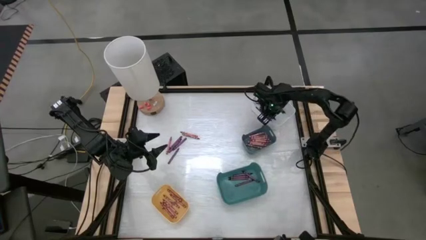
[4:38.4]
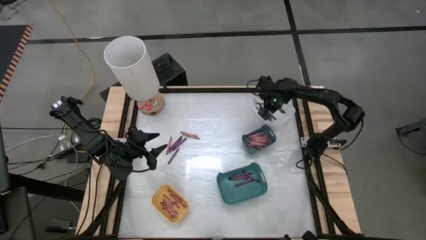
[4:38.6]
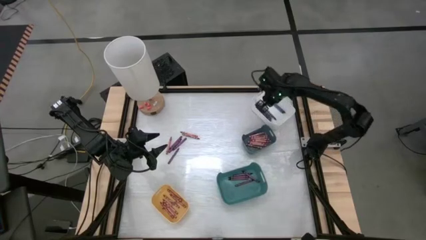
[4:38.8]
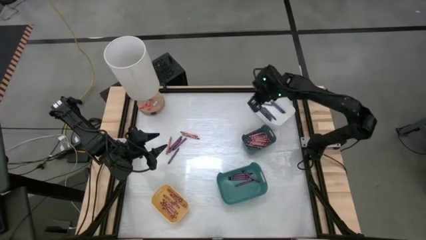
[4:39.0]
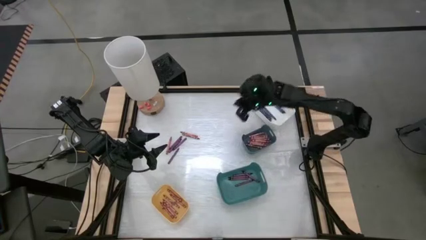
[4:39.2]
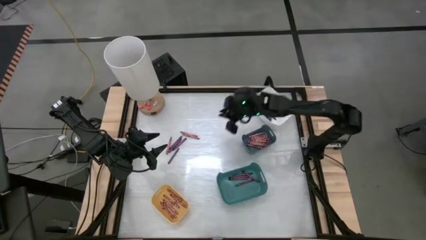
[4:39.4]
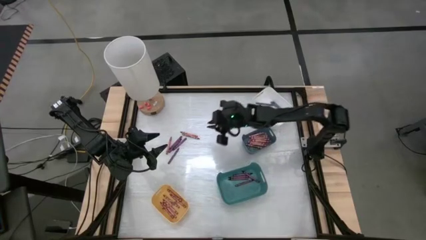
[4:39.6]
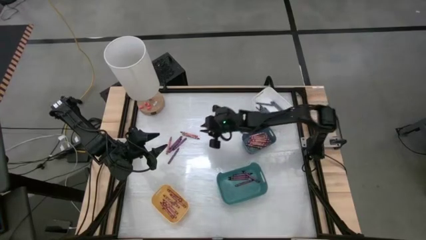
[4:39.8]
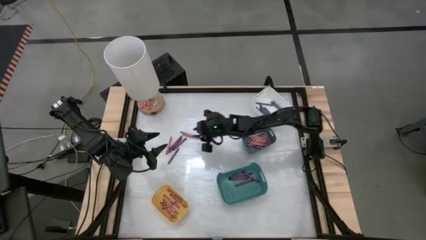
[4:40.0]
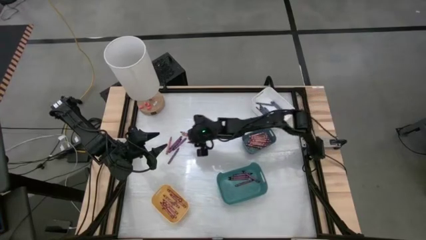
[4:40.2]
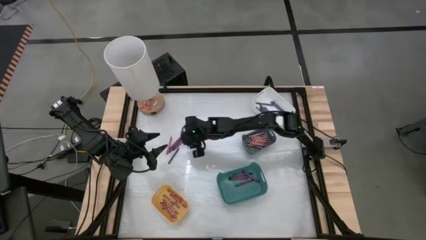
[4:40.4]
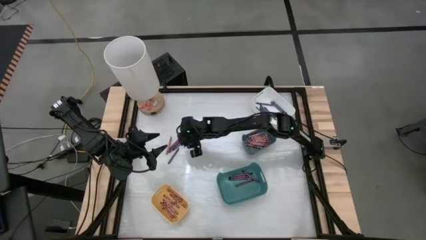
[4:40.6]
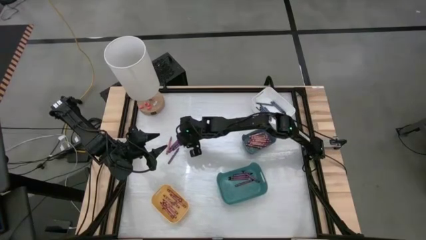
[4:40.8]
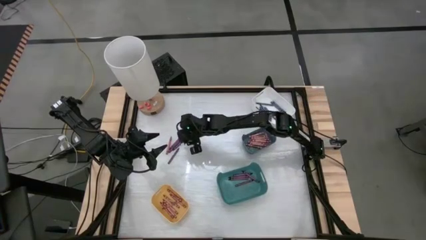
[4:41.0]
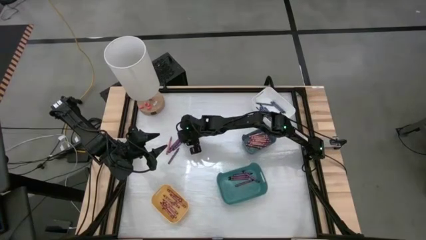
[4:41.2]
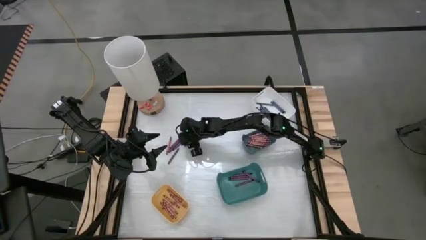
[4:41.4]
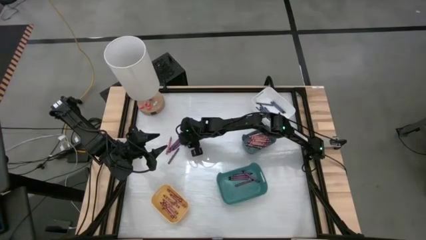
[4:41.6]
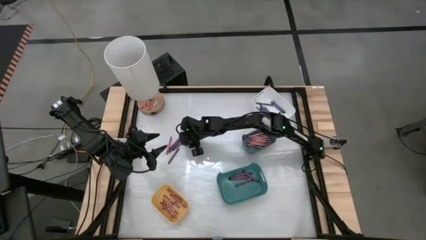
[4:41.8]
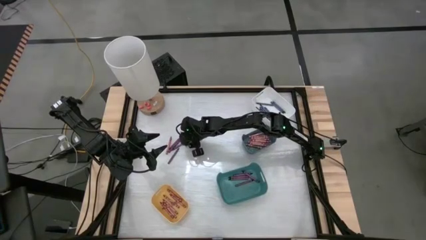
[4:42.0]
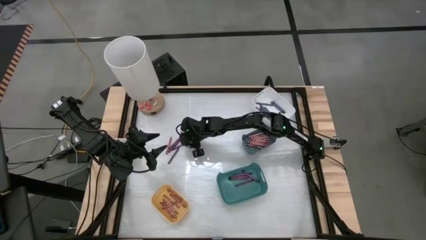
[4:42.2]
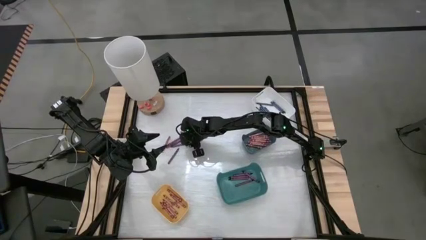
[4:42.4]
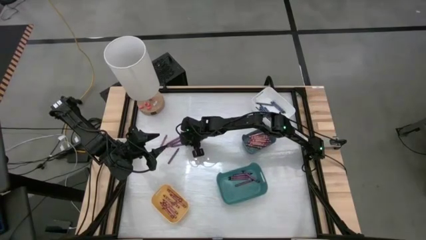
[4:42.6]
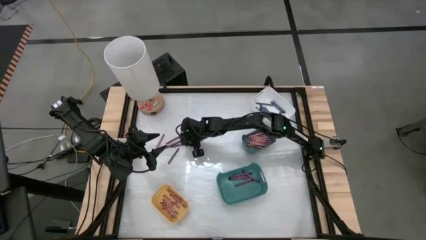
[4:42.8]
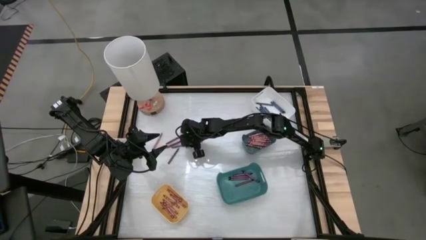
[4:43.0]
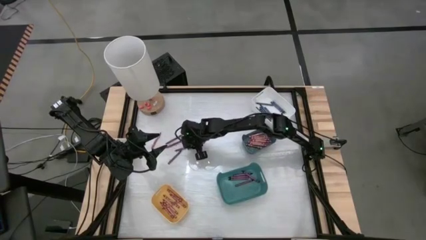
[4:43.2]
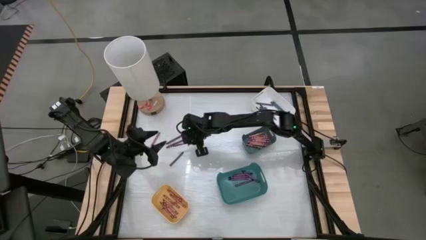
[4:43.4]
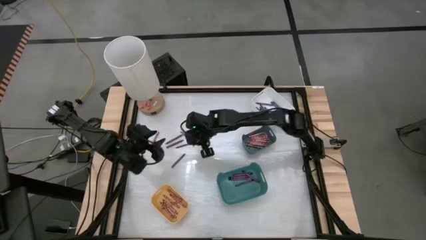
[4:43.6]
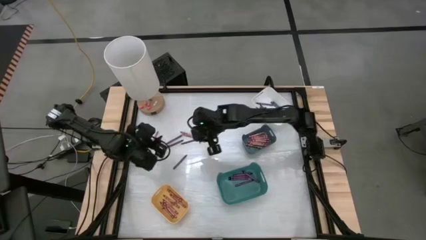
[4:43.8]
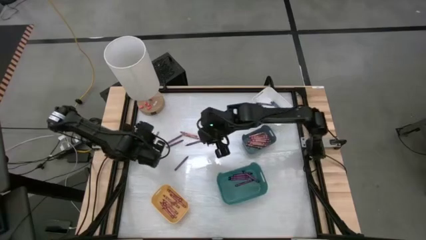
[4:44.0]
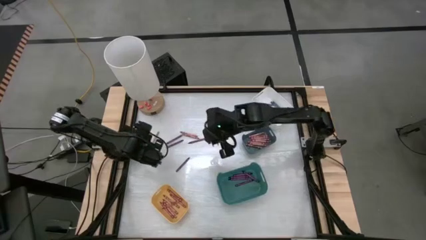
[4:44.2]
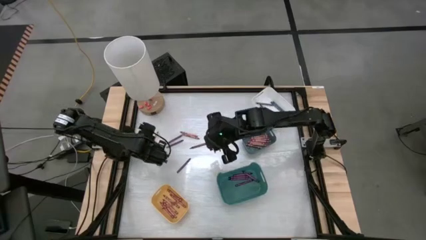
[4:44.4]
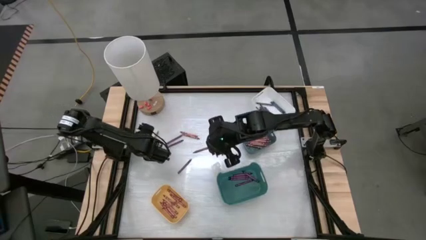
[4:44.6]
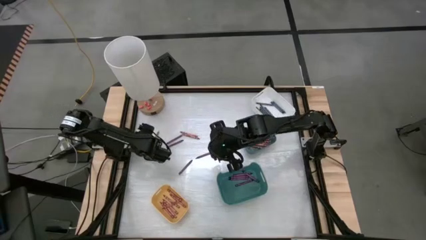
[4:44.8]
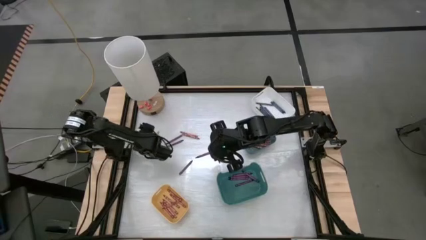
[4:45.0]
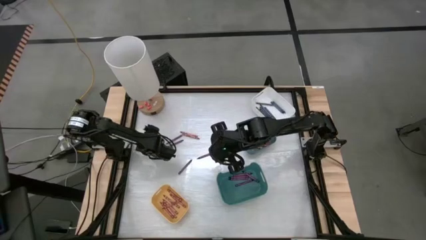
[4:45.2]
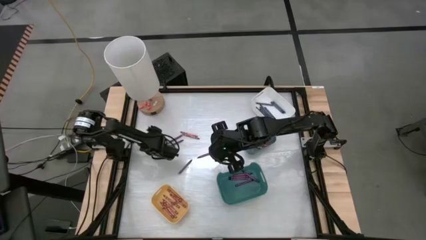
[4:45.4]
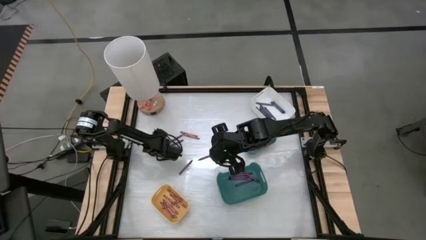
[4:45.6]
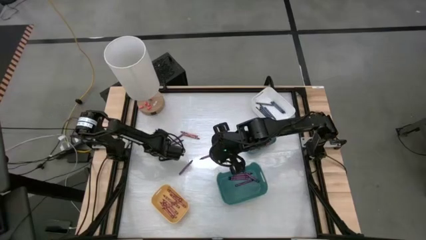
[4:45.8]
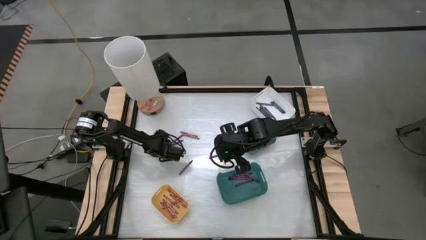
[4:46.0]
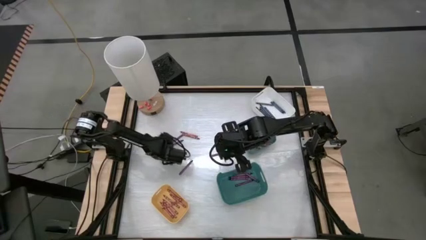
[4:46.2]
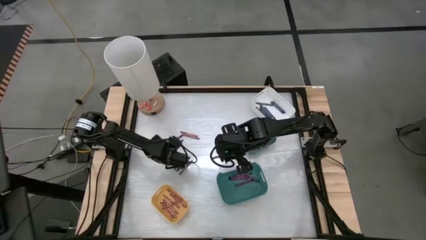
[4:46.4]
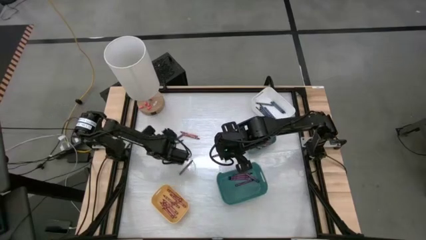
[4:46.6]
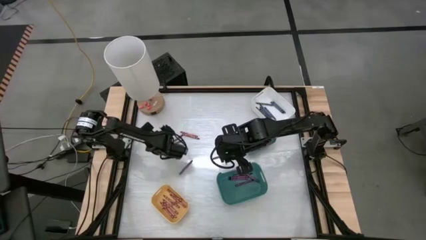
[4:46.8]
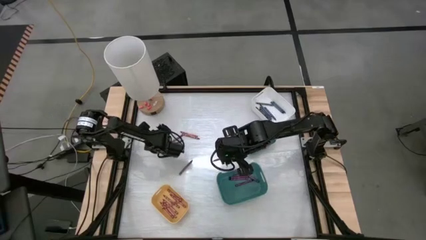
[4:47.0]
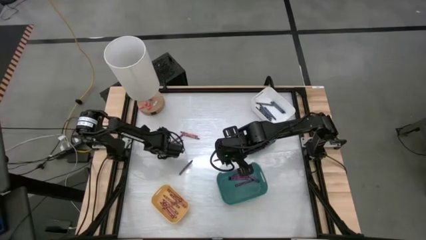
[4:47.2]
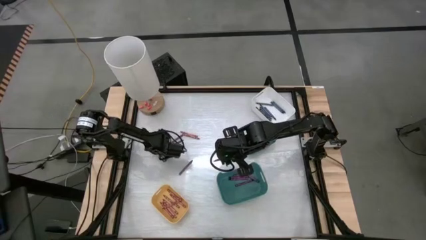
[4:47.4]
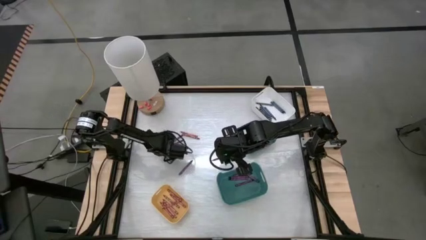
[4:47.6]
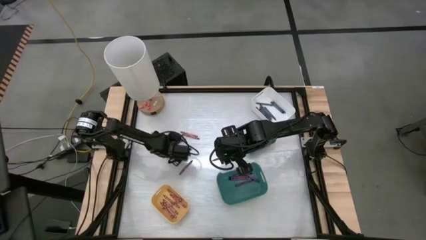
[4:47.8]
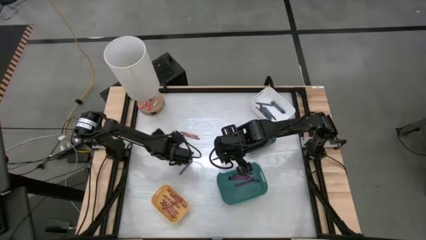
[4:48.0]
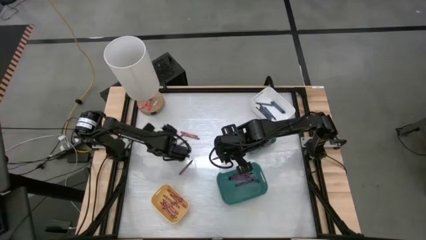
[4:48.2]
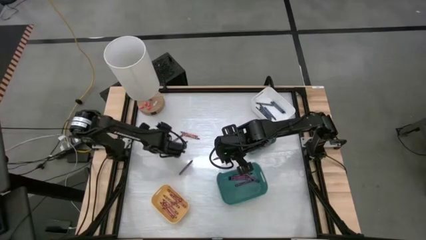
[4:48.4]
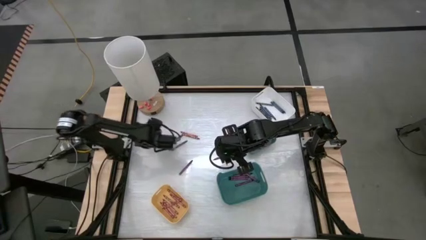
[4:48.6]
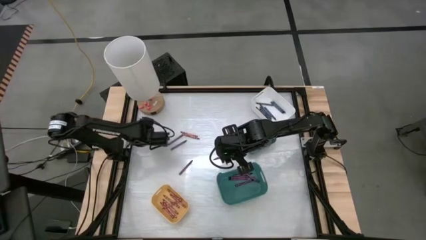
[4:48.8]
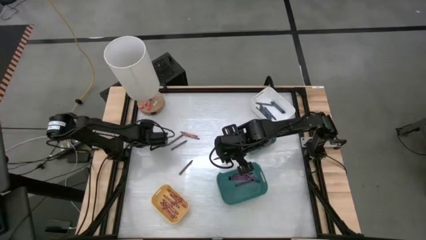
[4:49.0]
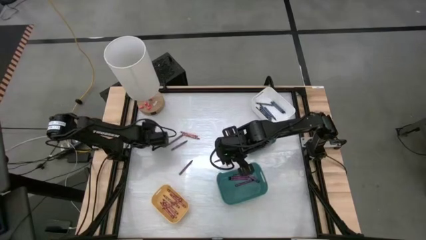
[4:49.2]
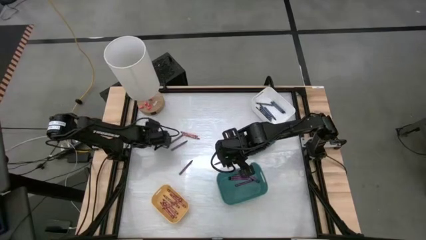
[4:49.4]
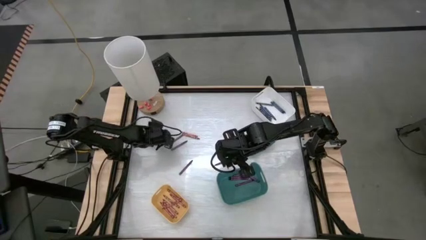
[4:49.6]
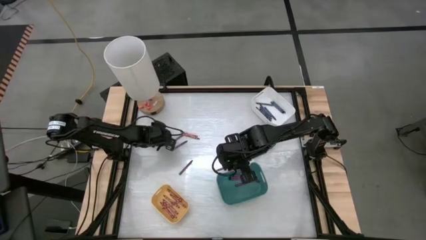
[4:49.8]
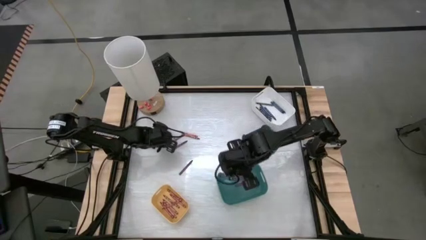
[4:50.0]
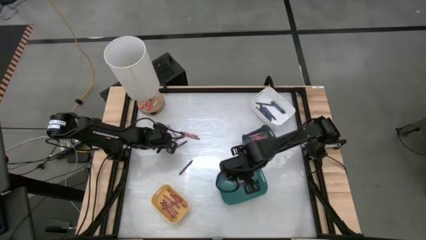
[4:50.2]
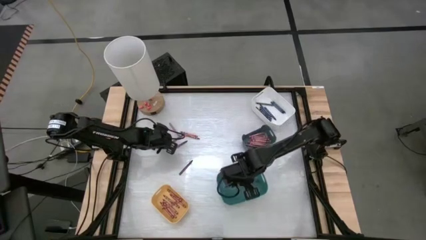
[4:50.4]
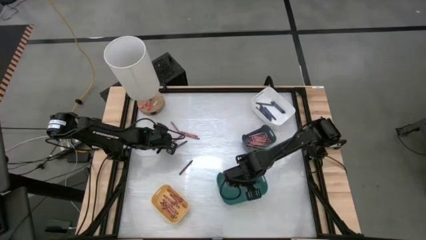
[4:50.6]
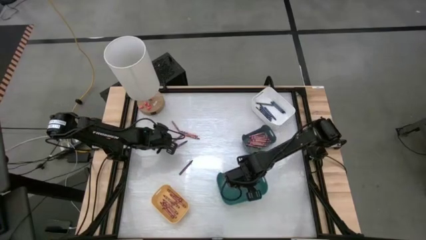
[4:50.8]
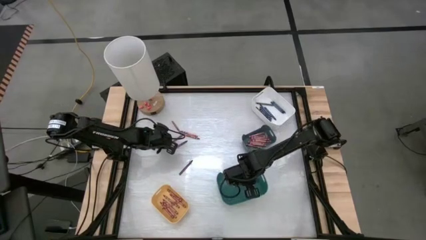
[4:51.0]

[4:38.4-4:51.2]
Task: Sort crayons
Put the purple crayon into the blue bin

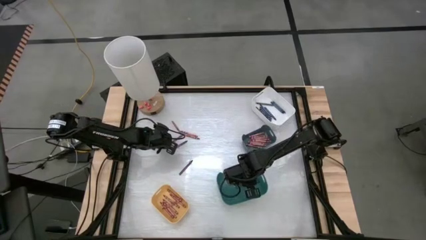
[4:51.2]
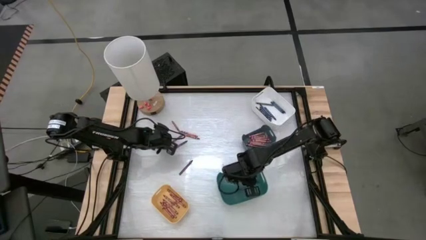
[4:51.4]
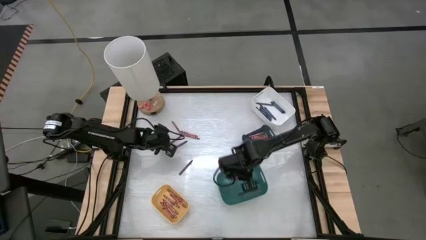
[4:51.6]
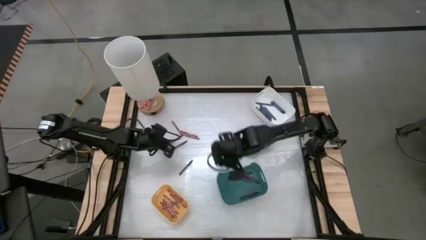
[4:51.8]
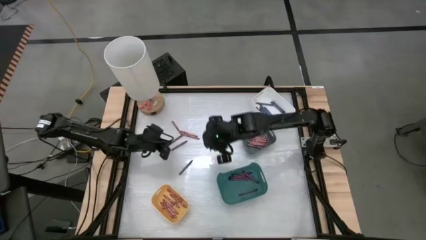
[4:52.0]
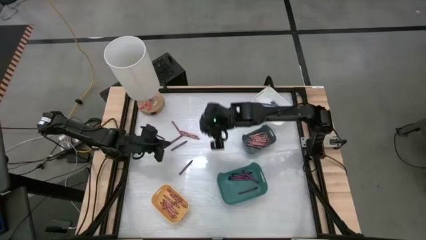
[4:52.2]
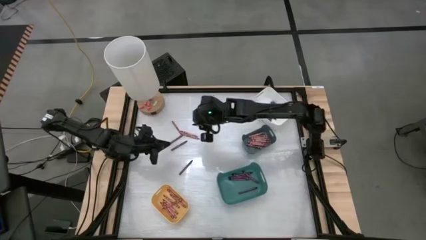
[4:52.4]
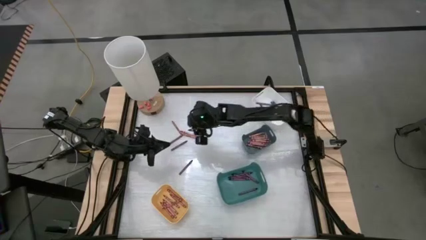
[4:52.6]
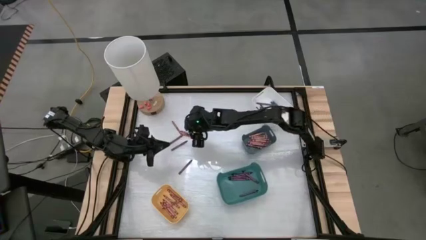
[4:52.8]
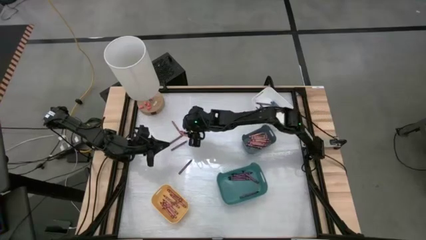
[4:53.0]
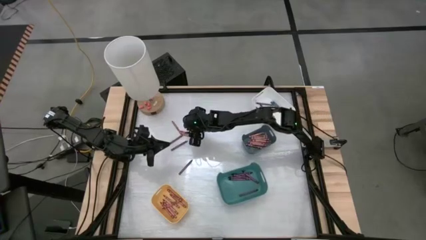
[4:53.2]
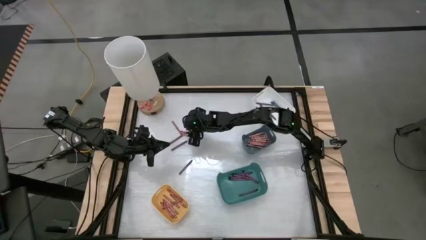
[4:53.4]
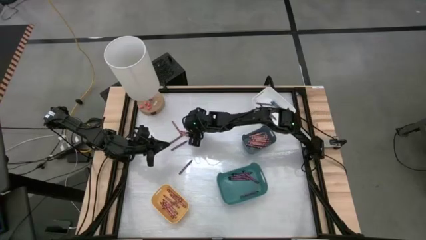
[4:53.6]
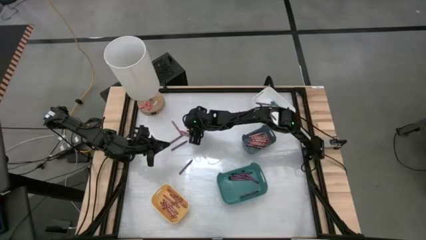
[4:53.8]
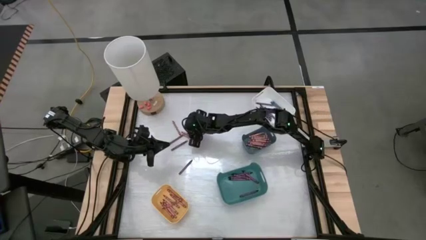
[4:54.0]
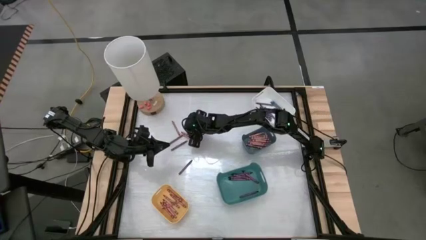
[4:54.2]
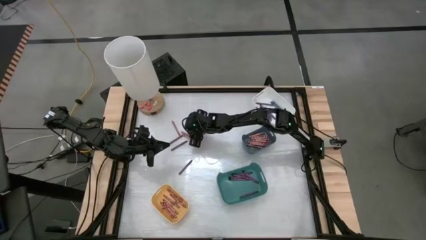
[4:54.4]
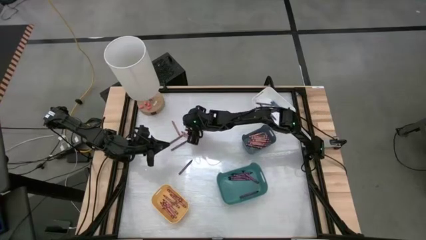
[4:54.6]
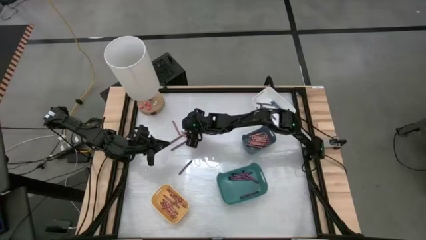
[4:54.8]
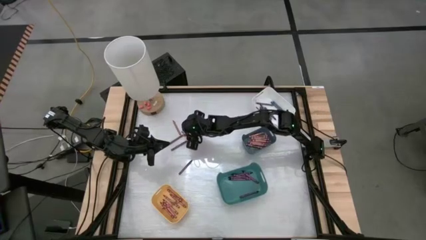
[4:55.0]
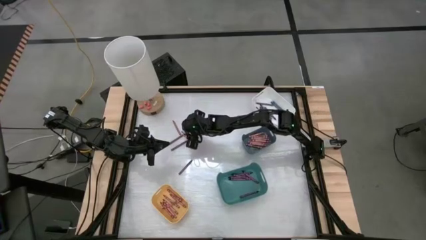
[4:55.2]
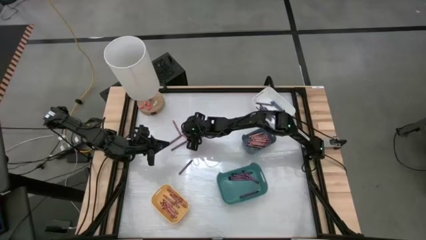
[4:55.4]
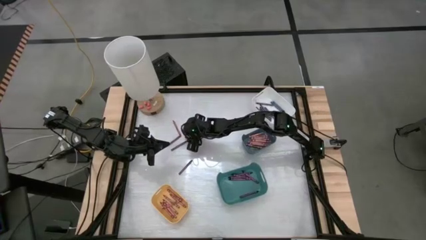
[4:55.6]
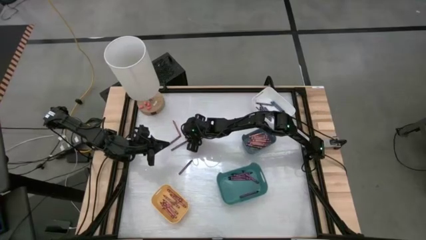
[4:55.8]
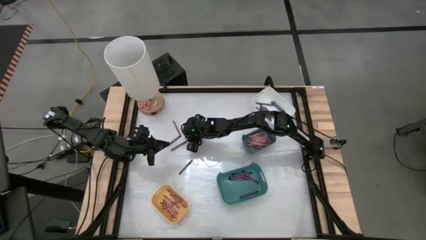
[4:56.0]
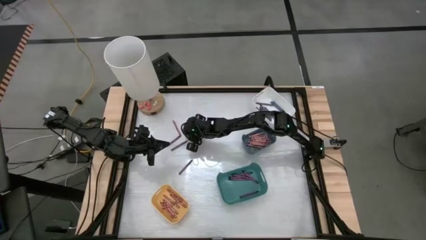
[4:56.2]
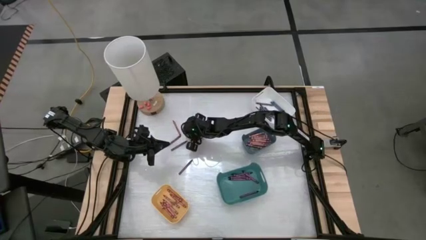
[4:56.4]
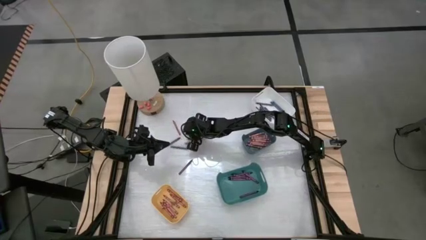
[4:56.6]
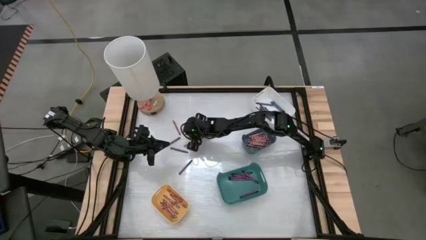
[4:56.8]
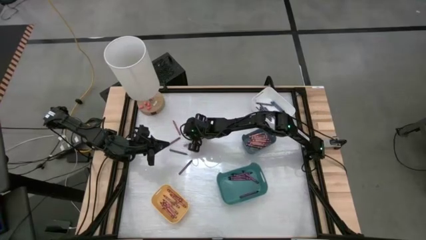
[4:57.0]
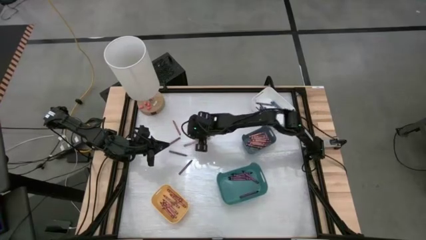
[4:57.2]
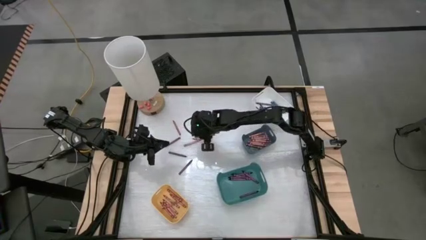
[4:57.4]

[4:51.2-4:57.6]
Put the red crayon into the yellow bin
